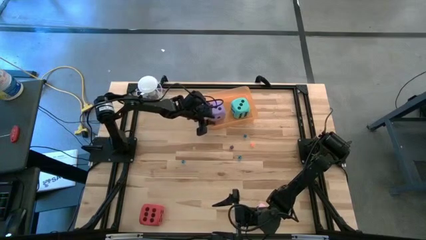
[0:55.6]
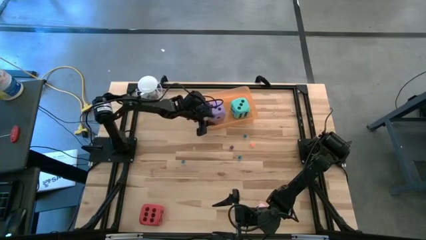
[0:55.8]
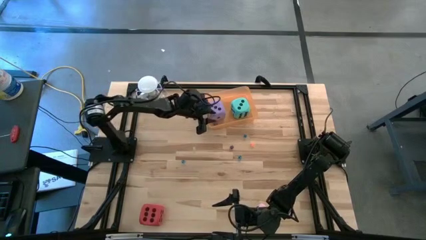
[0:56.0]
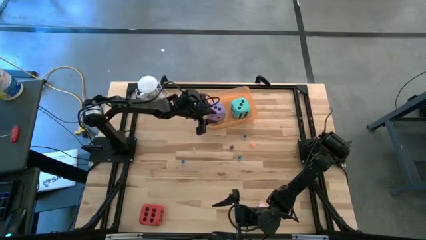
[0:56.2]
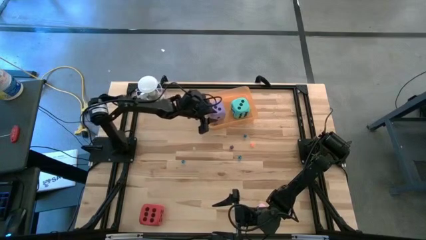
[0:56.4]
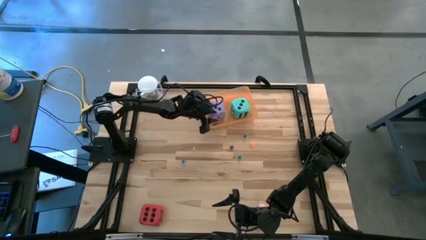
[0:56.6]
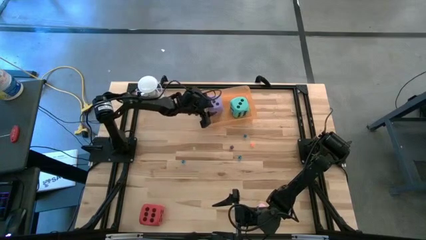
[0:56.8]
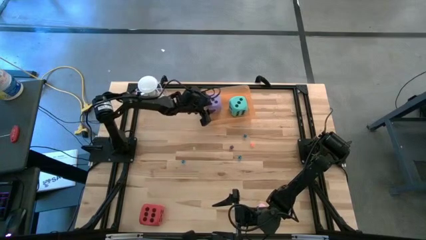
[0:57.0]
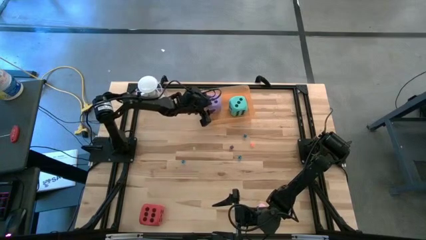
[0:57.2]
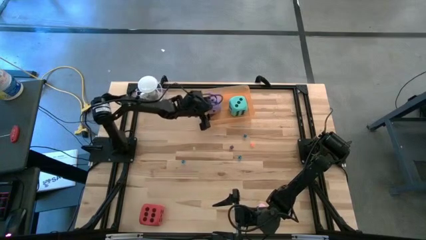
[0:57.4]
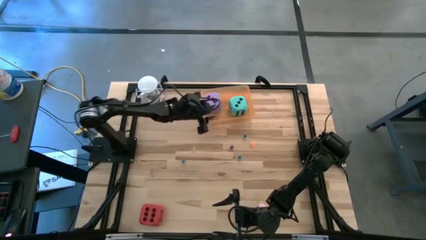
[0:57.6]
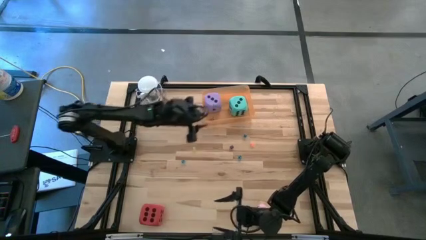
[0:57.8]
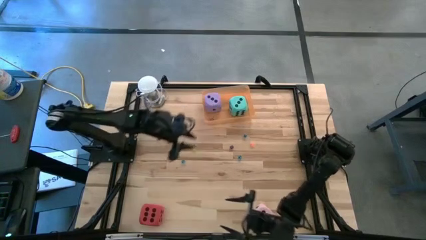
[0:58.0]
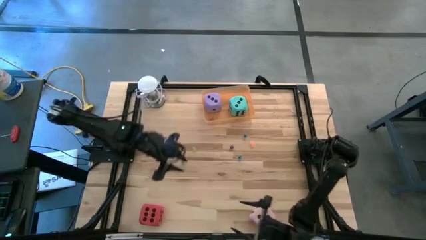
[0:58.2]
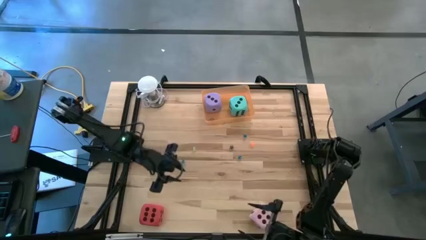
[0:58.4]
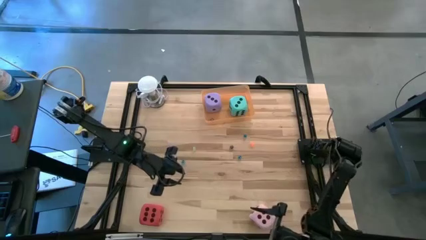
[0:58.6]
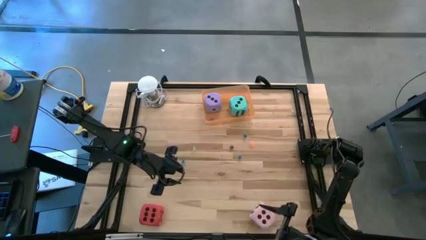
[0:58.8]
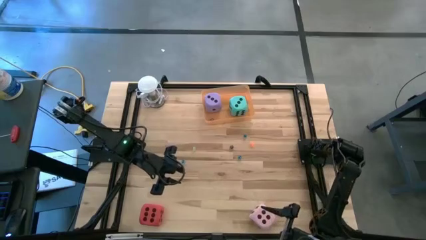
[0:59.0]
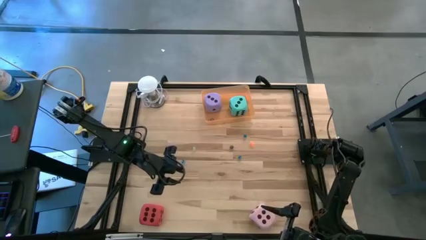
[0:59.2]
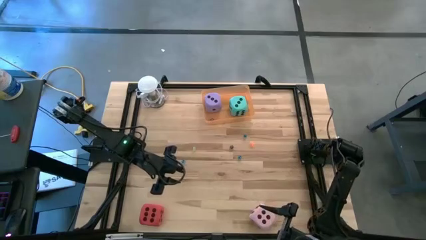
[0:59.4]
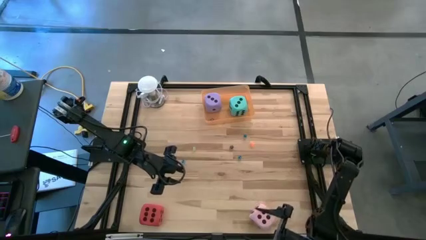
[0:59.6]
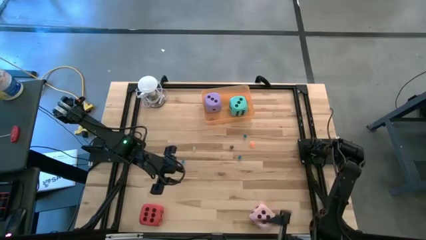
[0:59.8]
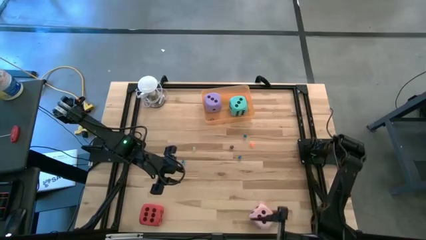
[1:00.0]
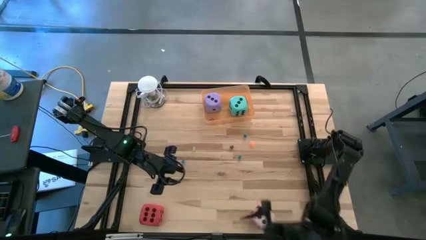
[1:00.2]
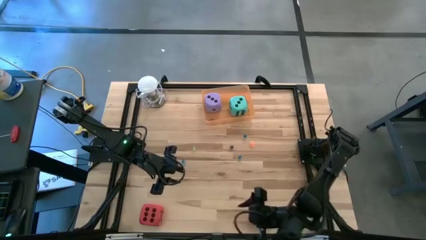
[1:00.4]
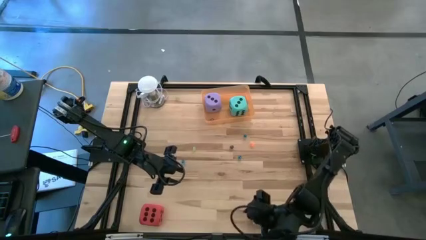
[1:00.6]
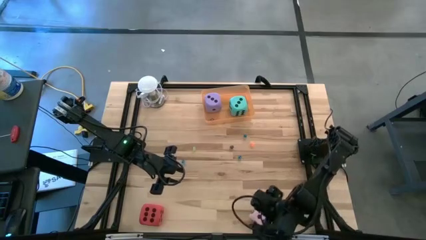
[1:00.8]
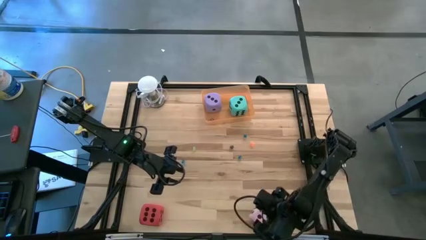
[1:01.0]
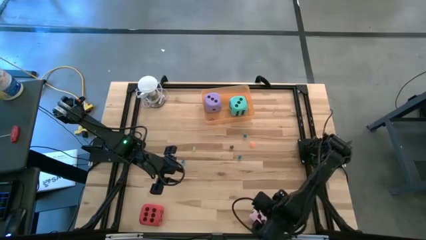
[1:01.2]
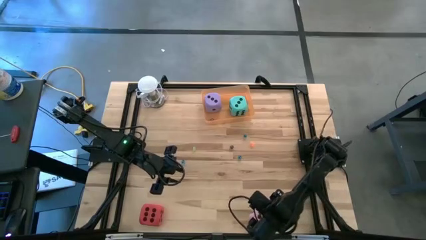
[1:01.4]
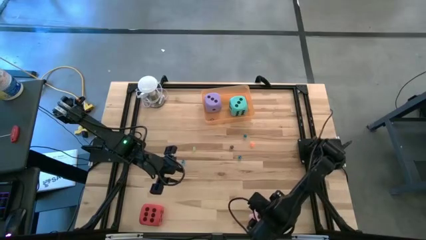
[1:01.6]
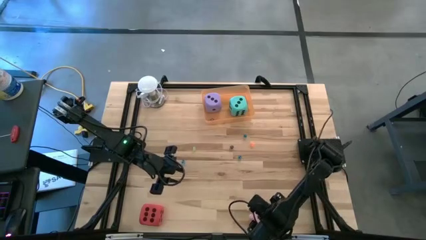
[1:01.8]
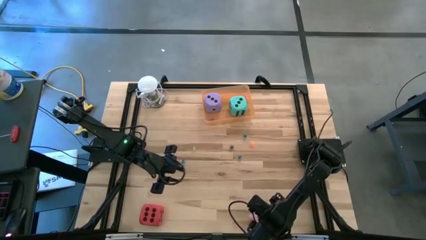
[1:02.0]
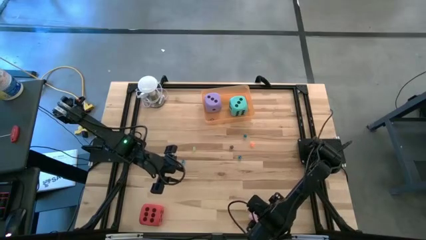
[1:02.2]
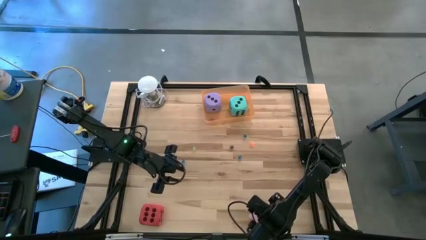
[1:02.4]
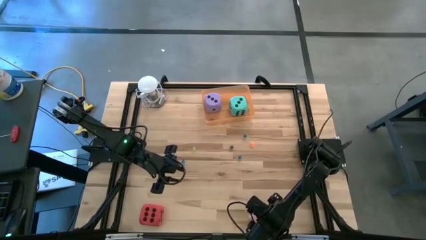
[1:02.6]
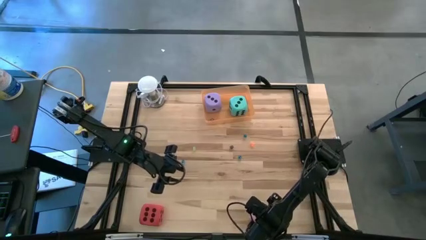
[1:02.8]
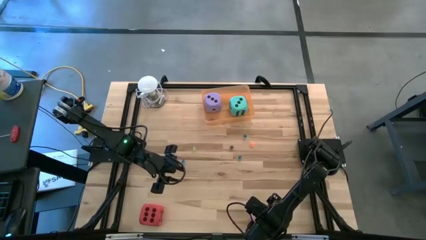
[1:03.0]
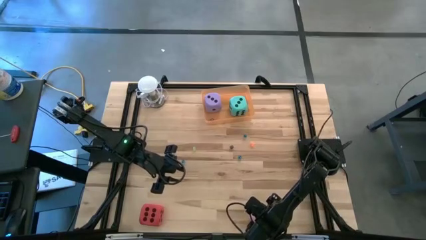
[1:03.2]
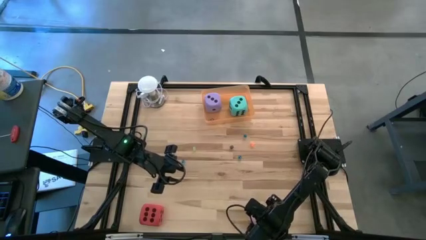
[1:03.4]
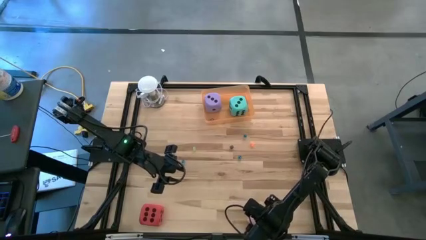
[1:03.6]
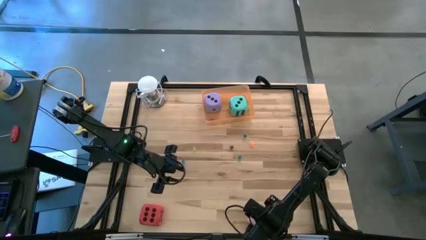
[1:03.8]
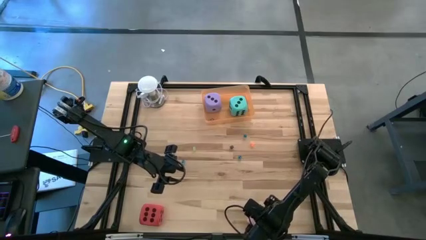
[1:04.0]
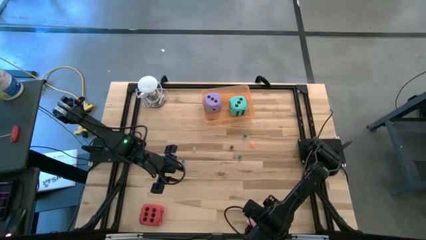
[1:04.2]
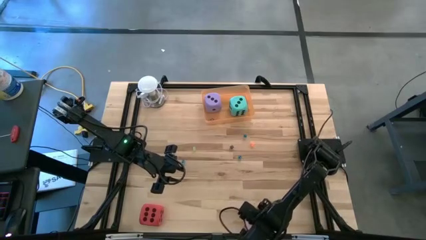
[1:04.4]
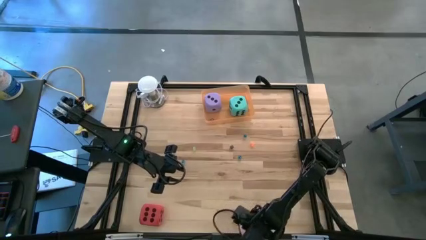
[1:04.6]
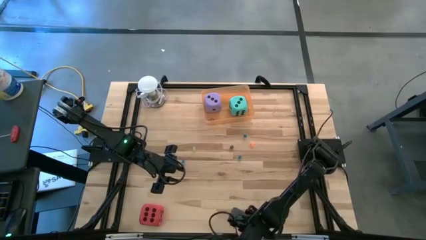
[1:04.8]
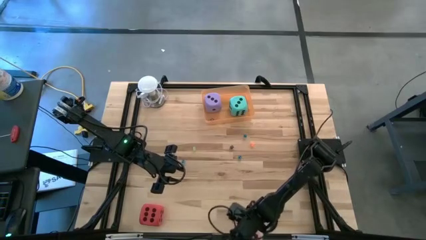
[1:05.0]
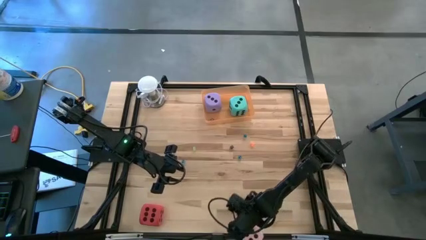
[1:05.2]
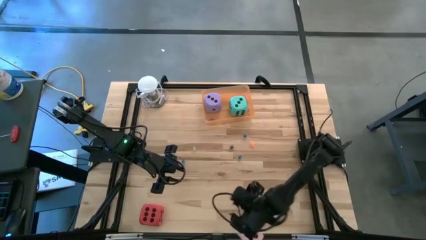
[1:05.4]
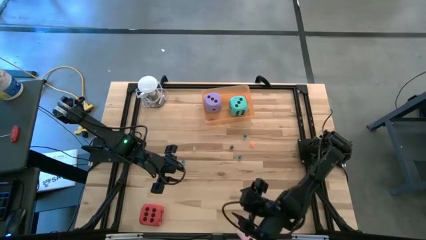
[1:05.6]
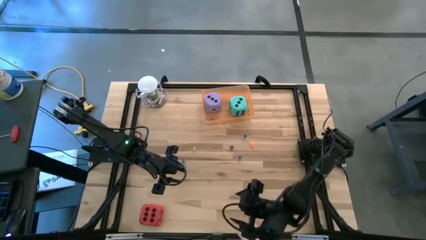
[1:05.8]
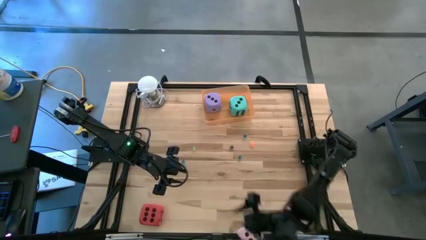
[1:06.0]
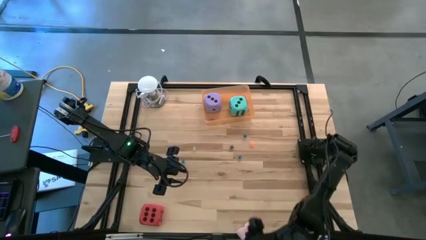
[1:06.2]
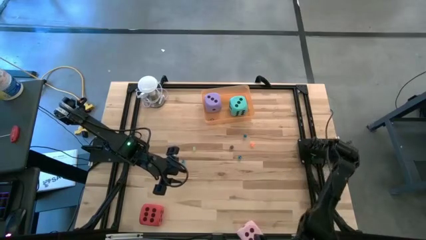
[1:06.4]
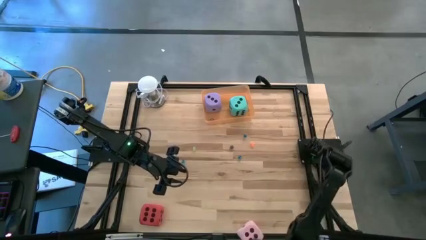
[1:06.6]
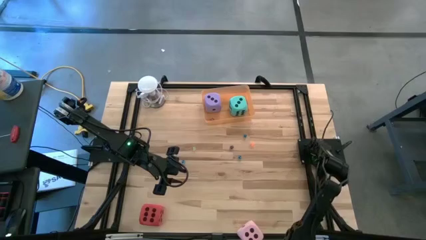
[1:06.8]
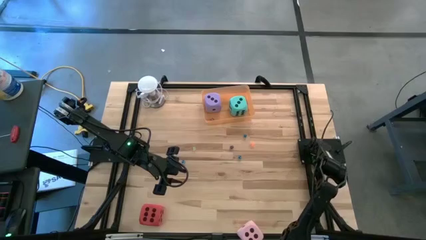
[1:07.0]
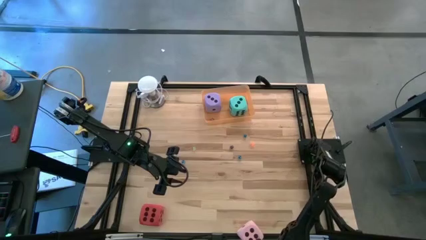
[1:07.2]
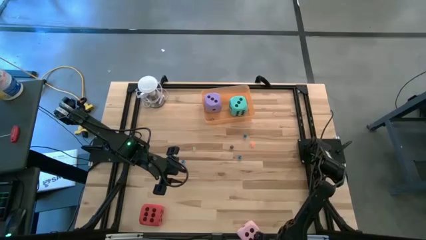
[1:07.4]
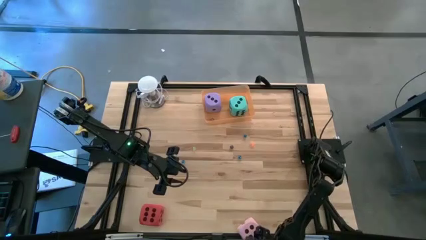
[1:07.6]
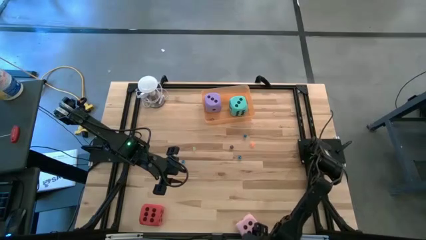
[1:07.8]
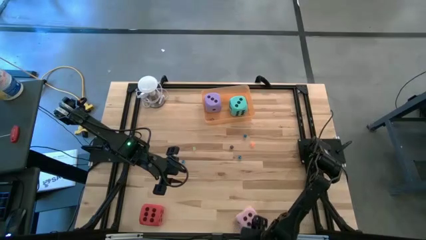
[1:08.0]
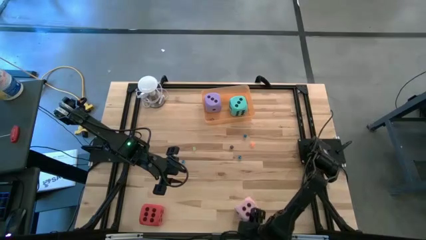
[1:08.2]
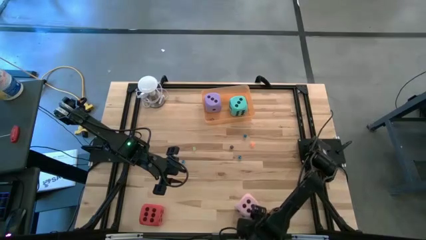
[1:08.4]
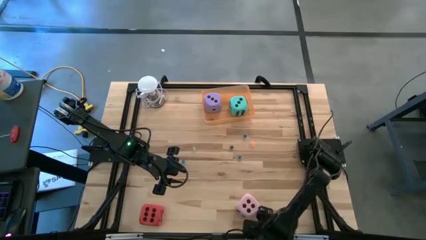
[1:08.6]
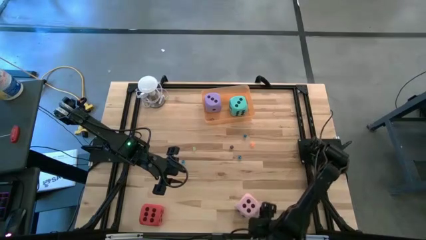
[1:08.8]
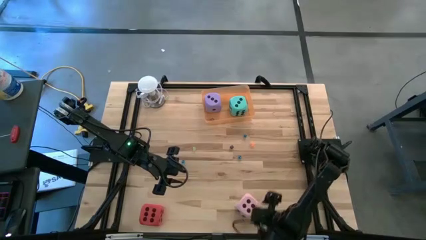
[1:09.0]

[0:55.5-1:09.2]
Task: Pick & Place Dice
Put the big pink die into the orange bin
